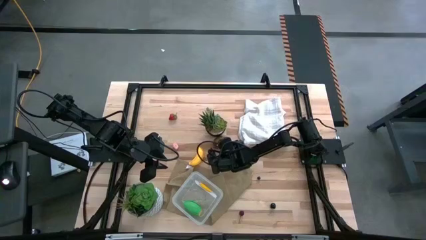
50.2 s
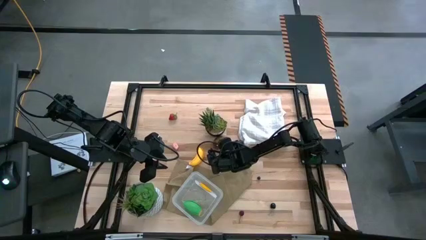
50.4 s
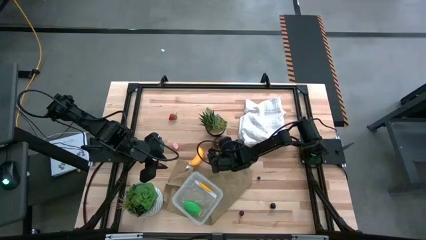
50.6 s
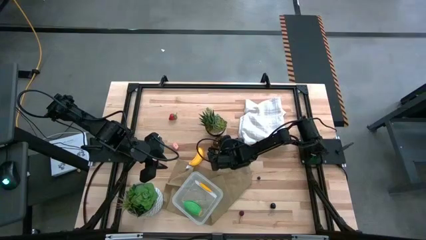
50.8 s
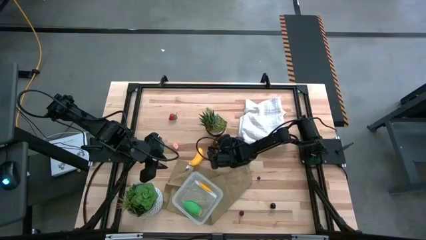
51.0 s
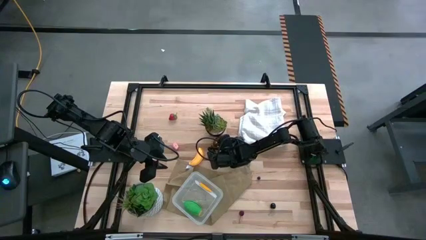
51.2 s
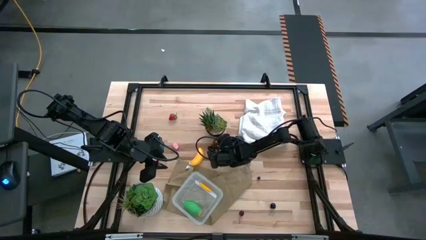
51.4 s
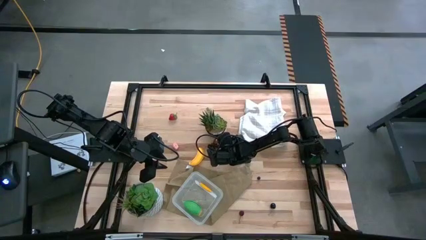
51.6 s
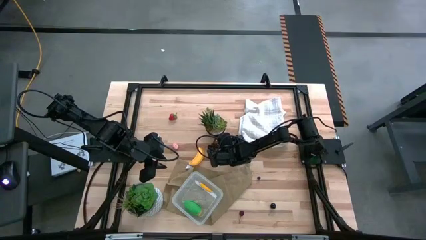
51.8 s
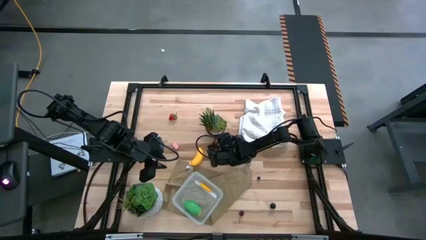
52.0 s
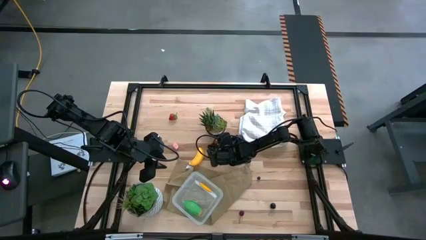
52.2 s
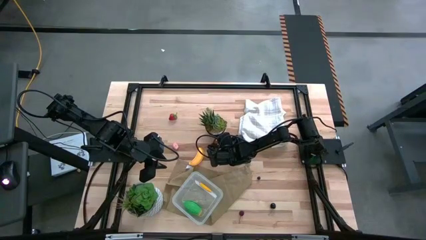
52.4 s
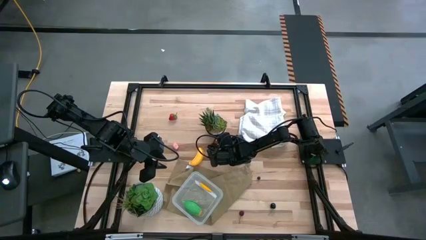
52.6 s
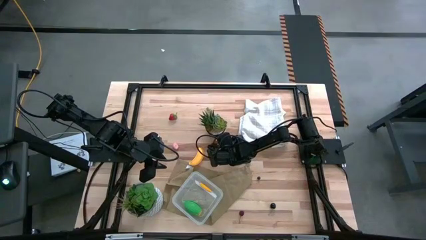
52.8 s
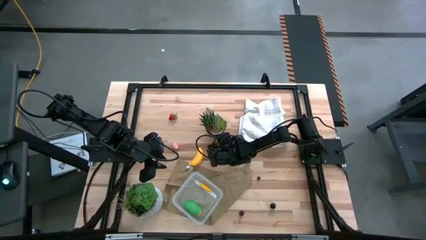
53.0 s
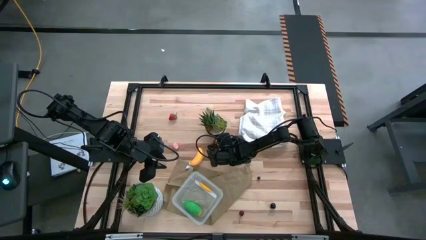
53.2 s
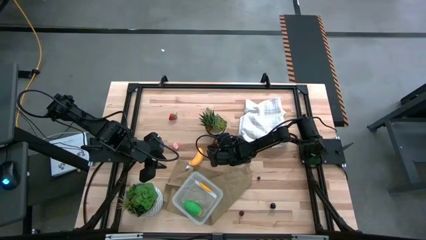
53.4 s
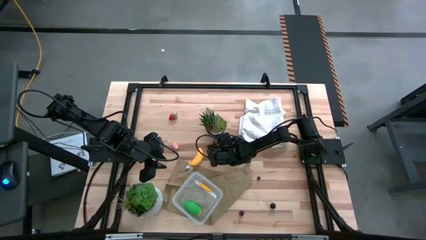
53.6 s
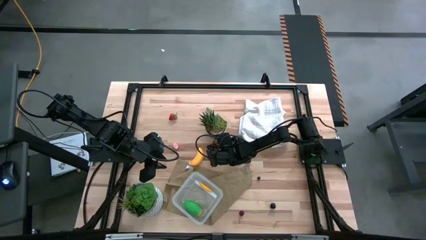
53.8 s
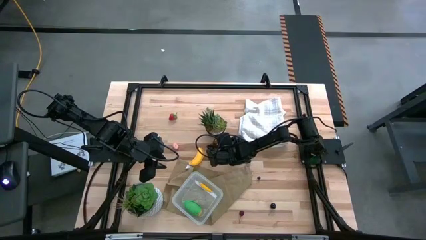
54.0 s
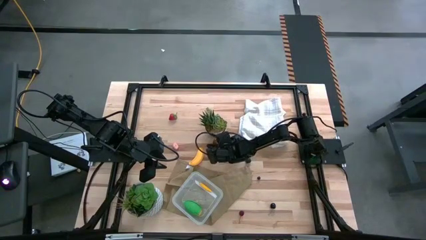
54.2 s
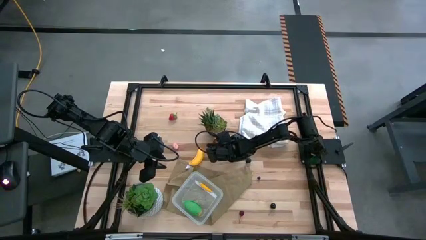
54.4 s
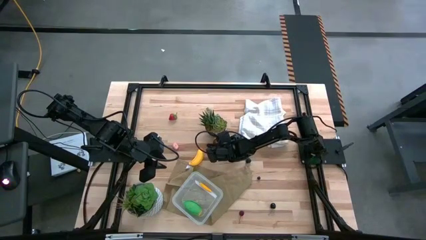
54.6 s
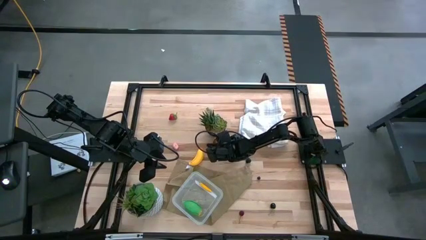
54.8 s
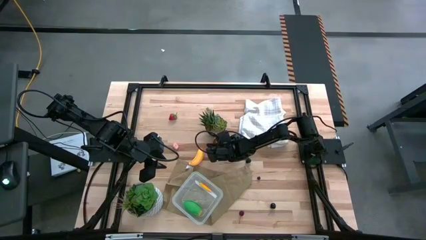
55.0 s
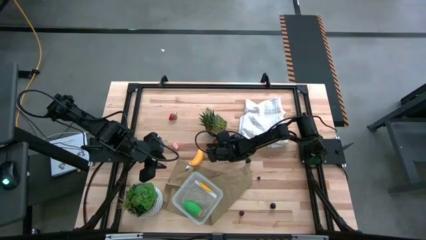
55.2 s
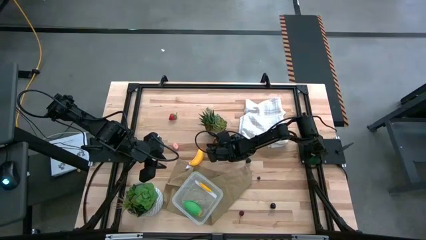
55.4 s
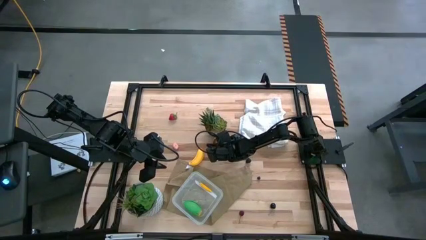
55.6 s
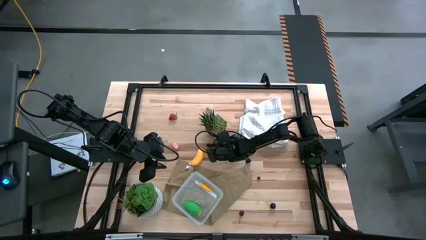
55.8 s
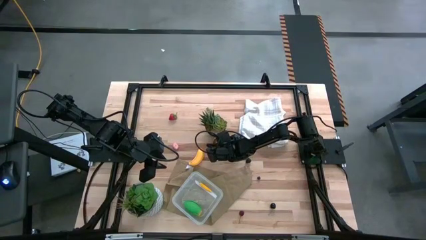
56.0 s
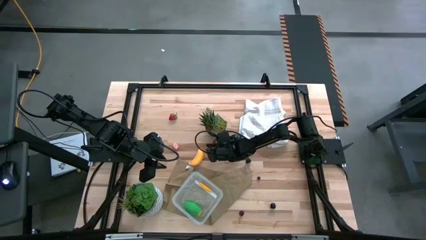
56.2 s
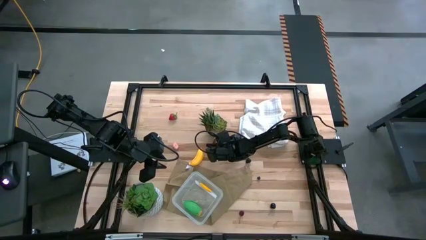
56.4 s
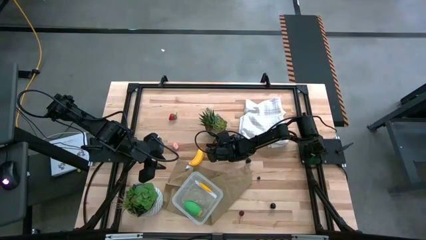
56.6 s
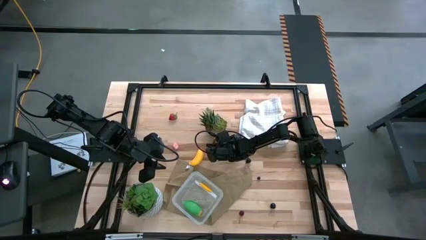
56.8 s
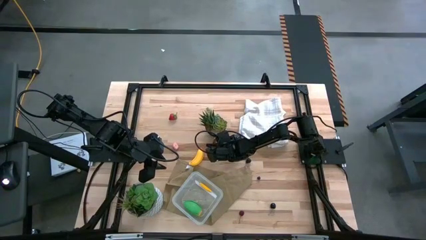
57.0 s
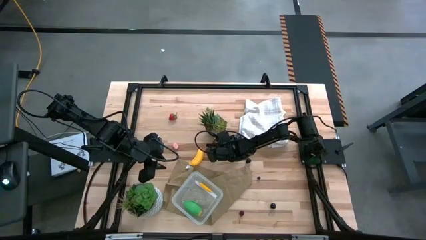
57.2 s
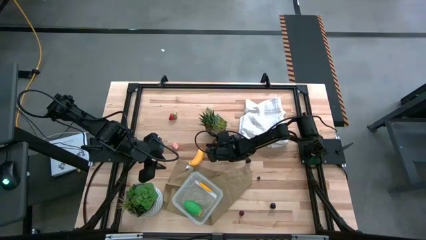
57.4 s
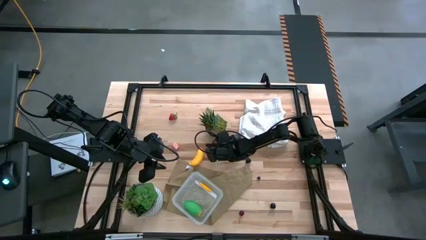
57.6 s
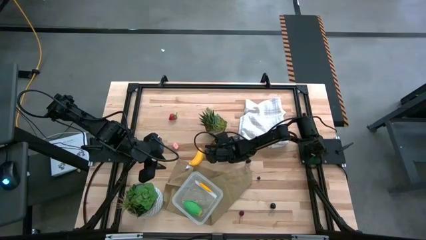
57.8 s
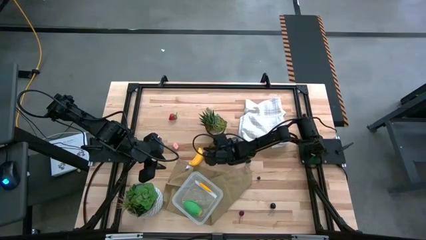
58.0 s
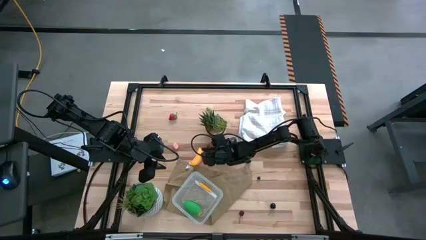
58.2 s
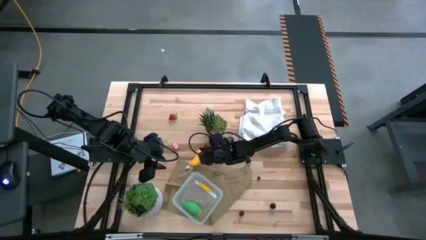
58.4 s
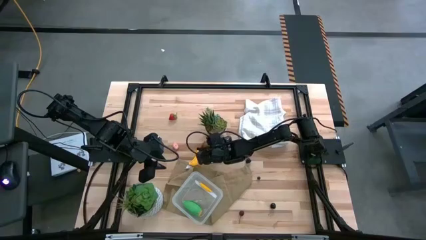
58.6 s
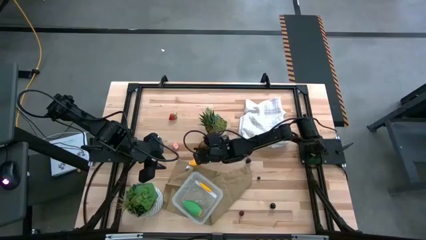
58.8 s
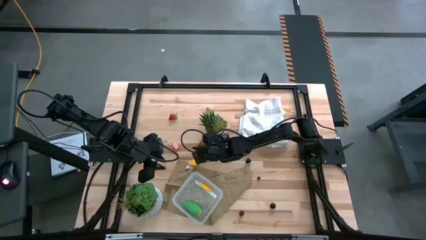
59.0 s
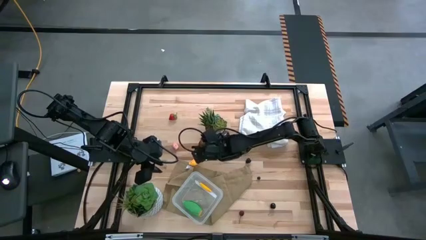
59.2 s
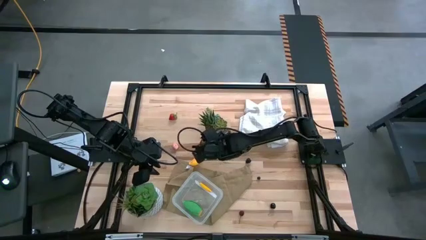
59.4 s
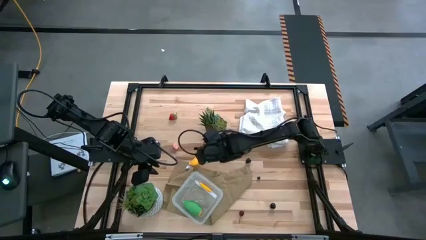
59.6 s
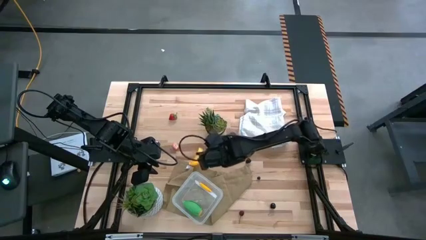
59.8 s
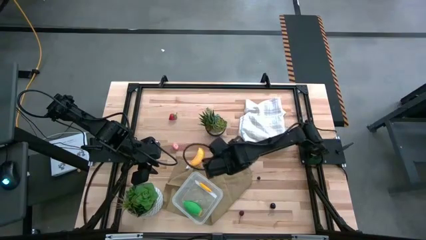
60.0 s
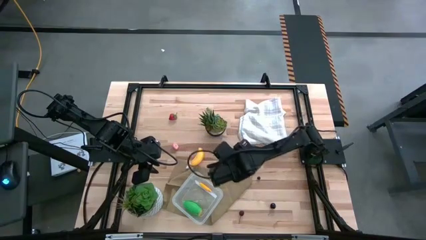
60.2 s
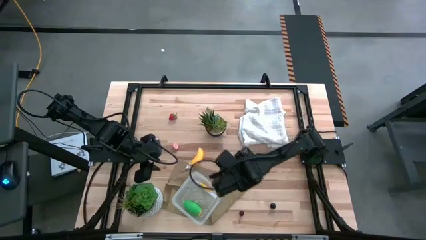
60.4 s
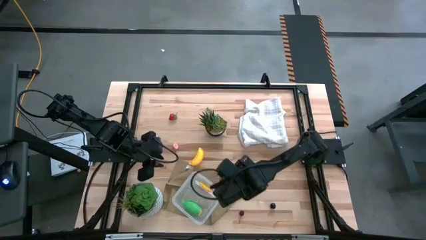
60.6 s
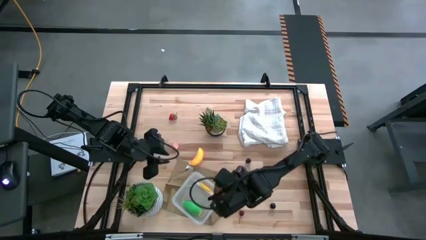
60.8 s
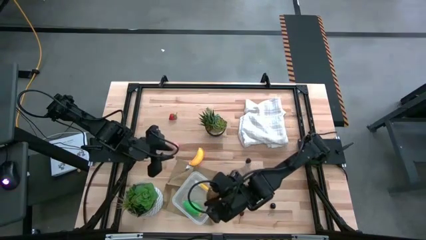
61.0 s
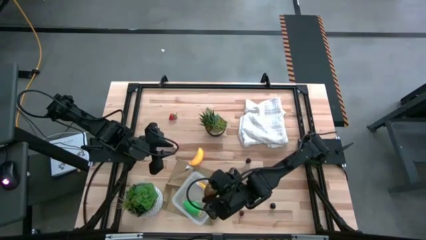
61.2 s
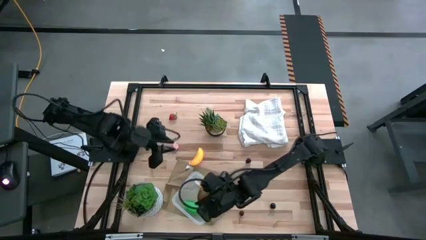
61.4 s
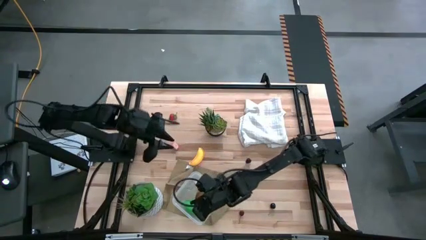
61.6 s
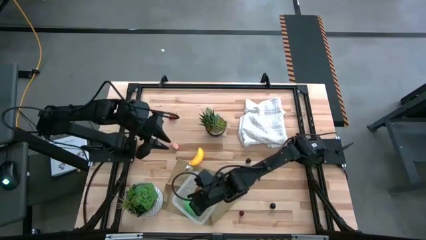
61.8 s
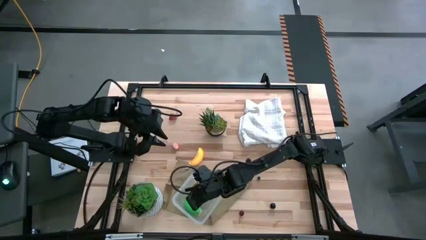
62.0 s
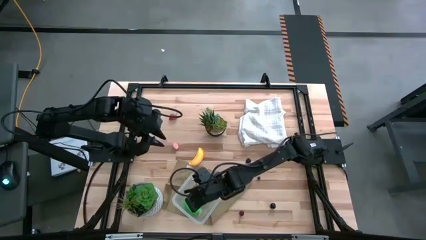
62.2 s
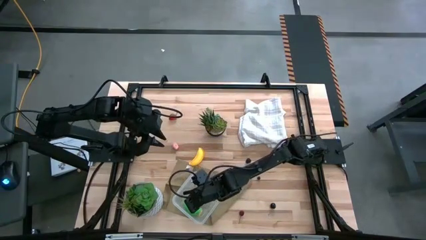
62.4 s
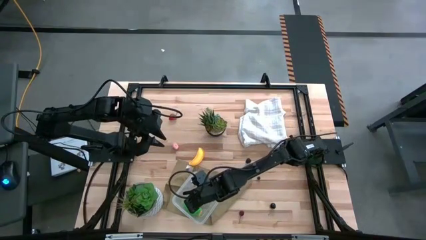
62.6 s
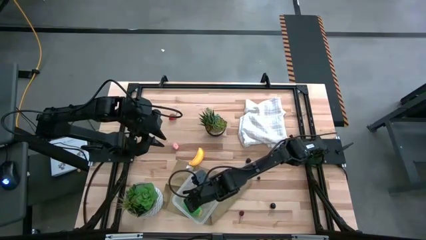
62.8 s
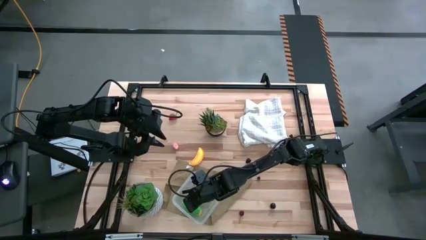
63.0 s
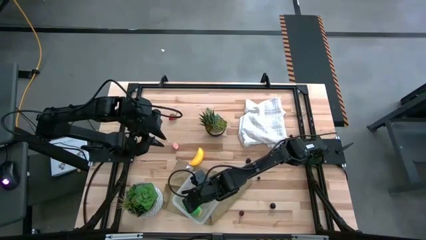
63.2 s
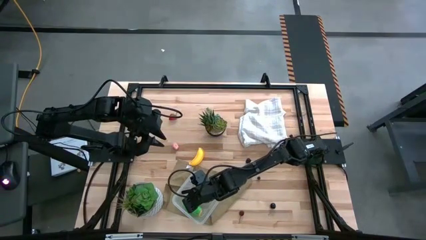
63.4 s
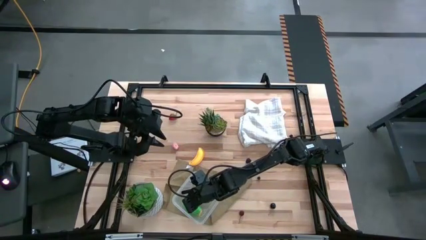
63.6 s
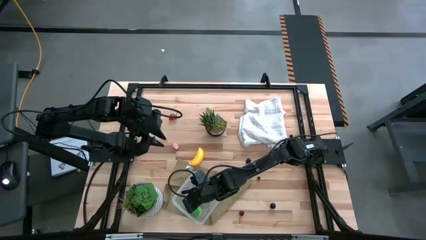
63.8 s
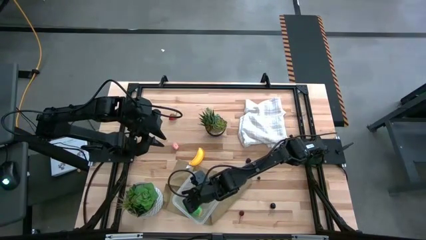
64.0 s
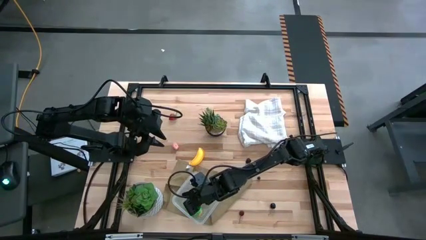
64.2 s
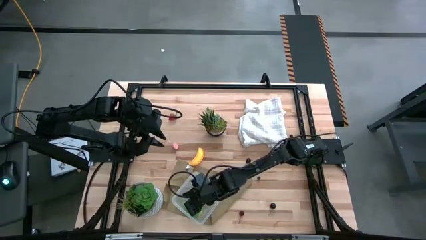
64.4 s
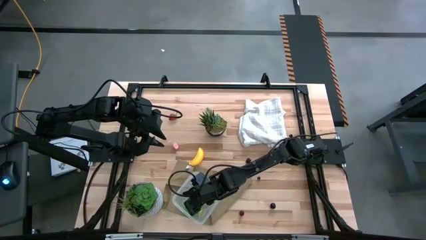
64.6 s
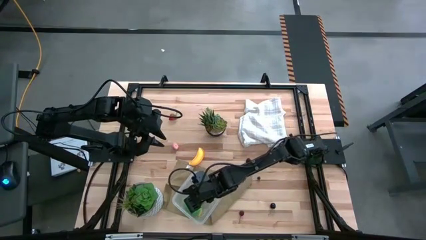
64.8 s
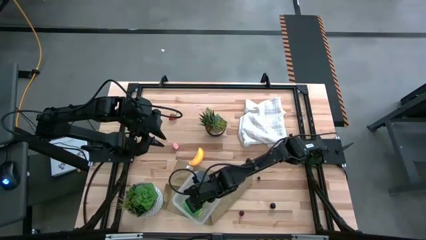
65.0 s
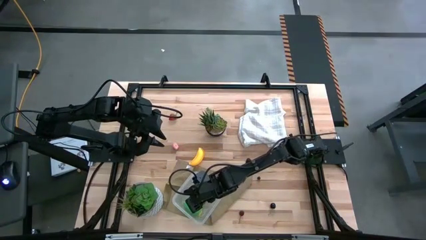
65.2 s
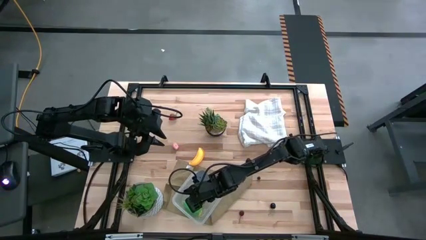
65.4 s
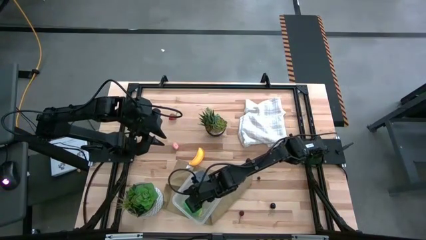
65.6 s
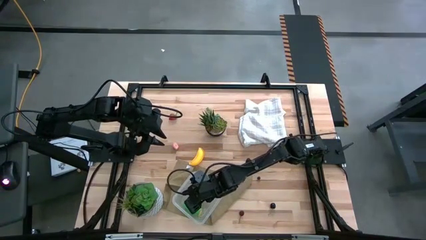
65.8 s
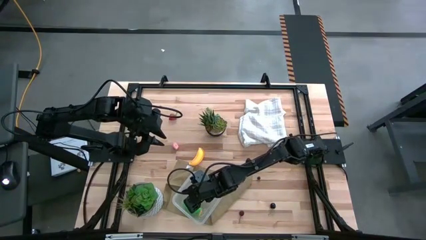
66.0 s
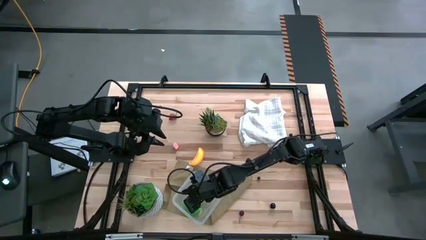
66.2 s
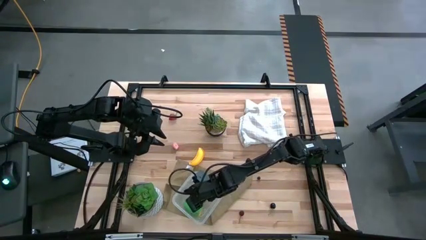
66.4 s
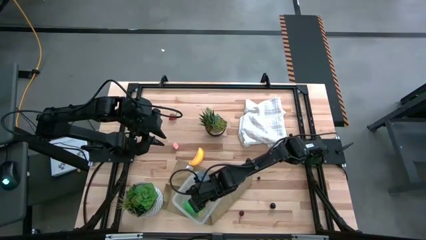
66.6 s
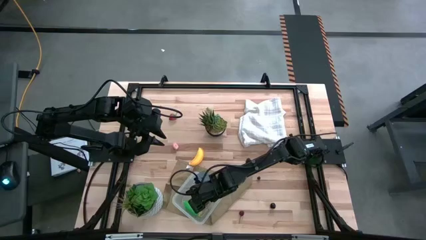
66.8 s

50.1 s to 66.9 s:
Task: Pick and placing Produce into tupperware
Put the kiwi into the container

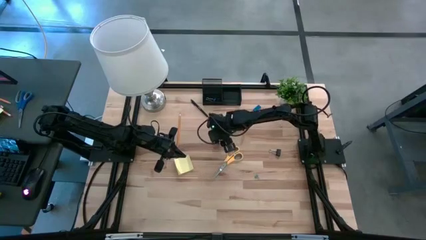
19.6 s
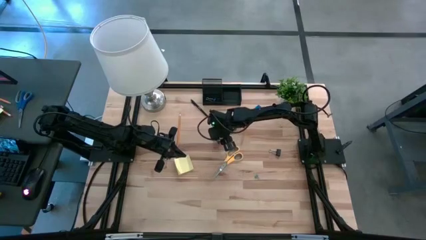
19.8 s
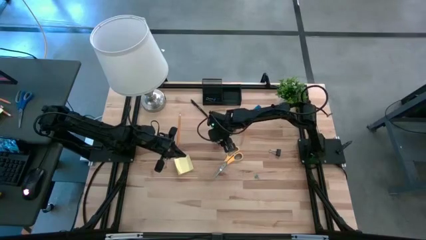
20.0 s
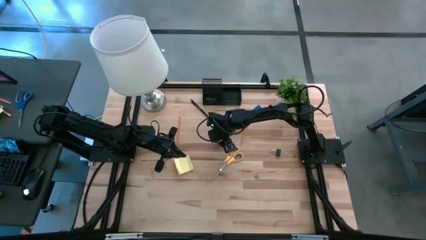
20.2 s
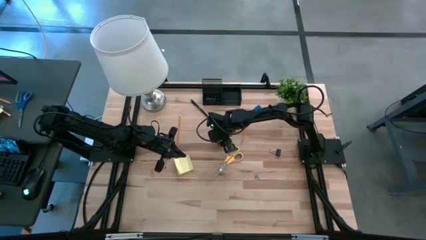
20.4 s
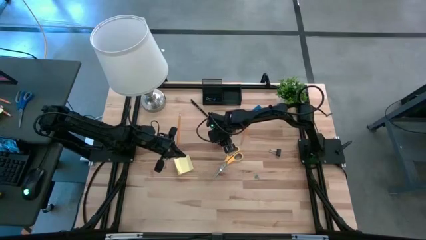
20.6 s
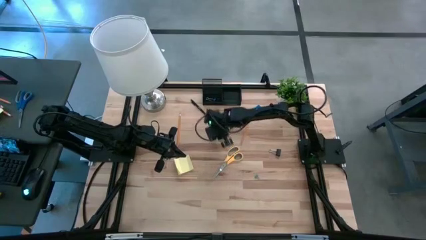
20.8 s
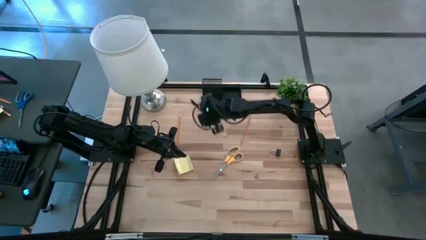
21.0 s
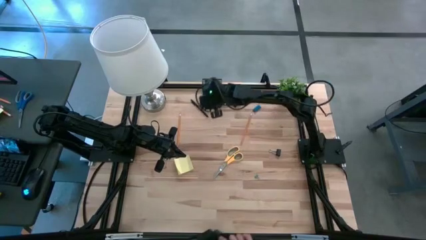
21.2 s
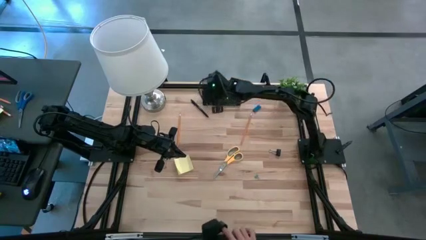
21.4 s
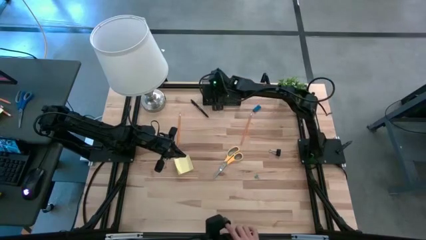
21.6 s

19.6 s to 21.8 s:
Task: Pick and place office supplies into organizer
Put the left black binder clip into the desk organizer
